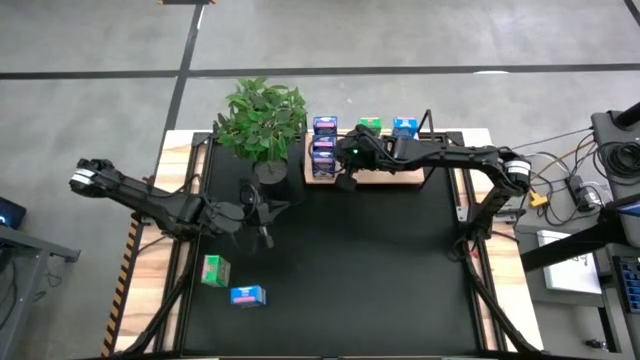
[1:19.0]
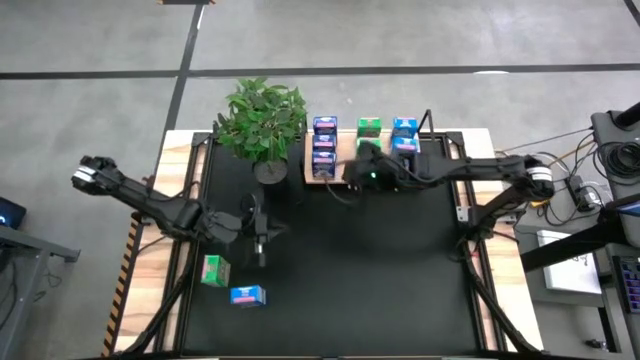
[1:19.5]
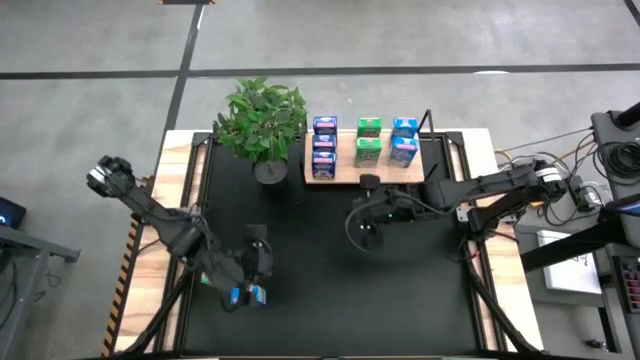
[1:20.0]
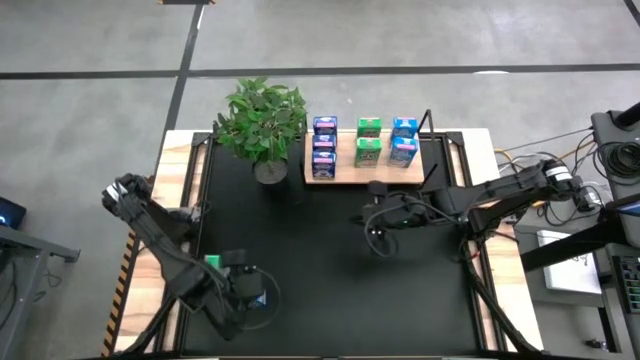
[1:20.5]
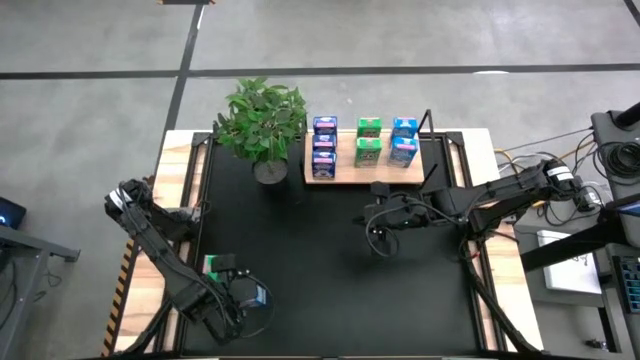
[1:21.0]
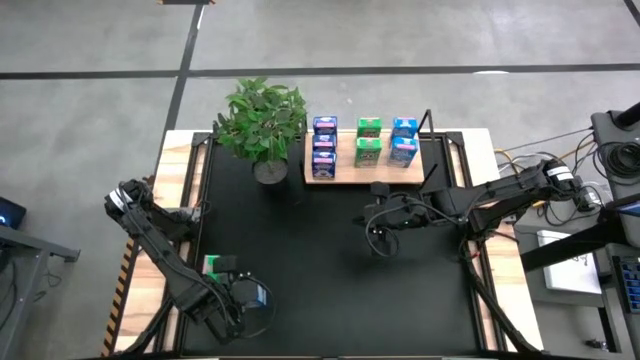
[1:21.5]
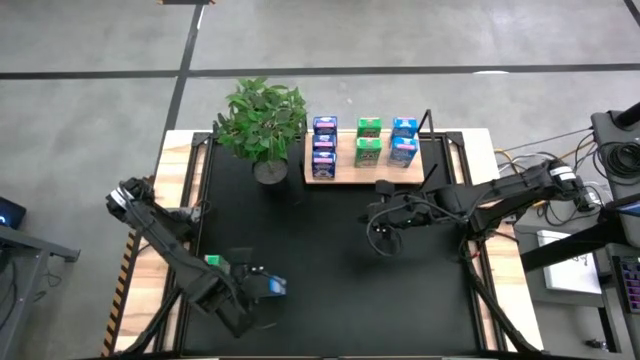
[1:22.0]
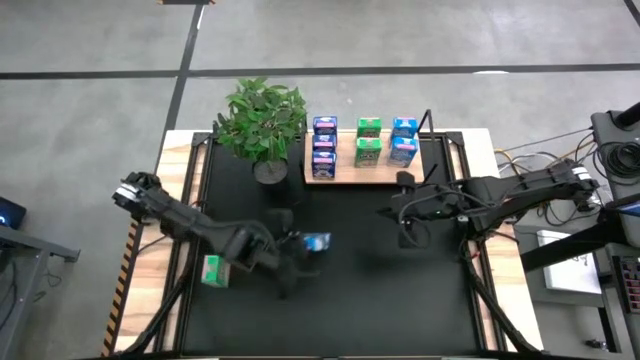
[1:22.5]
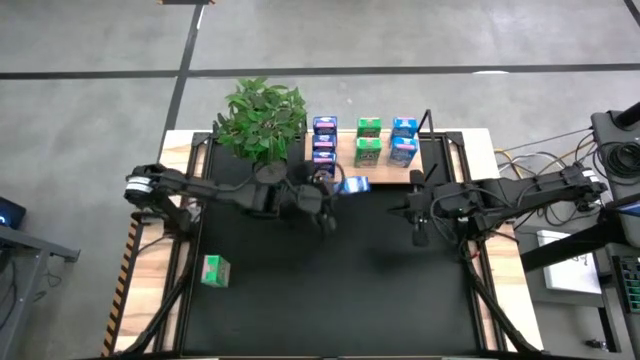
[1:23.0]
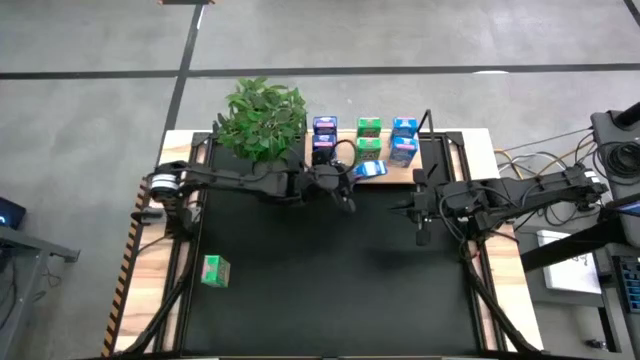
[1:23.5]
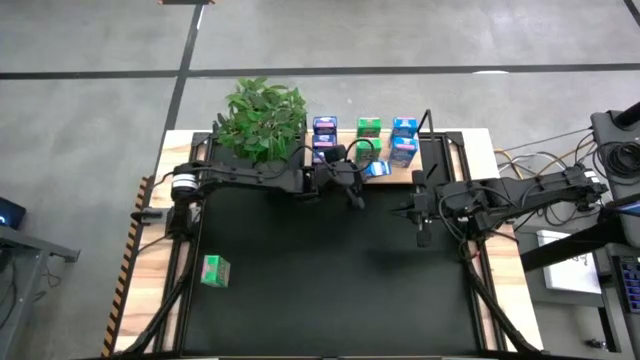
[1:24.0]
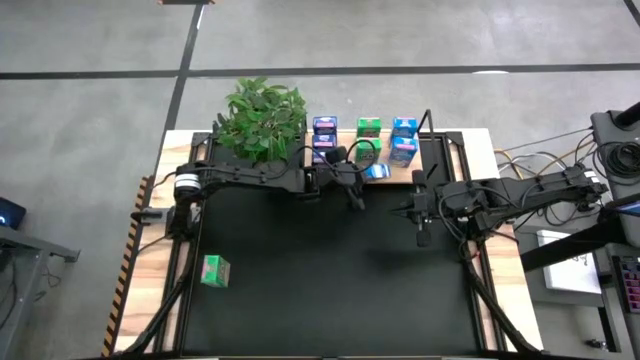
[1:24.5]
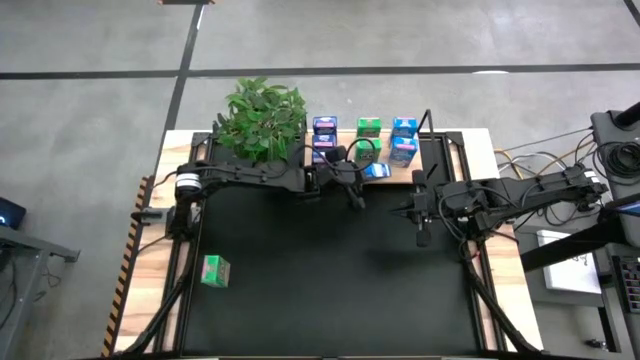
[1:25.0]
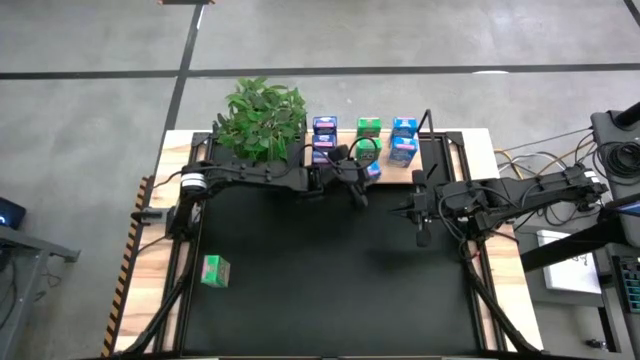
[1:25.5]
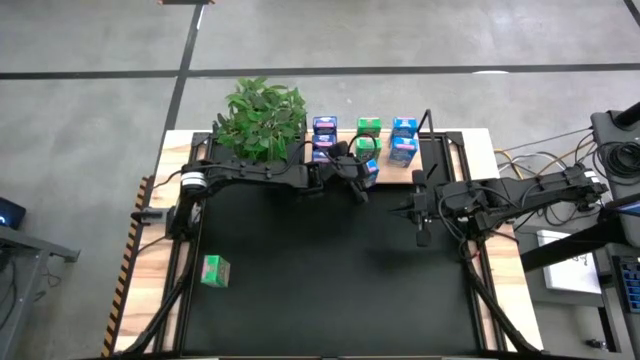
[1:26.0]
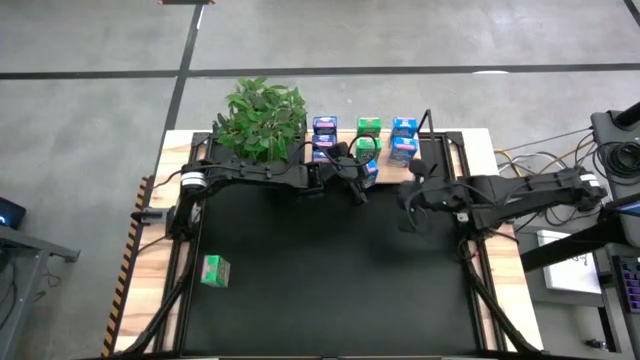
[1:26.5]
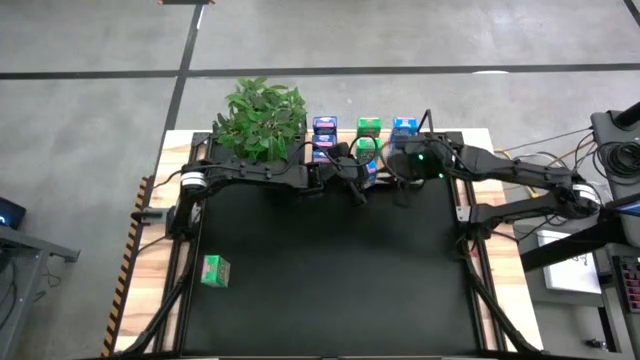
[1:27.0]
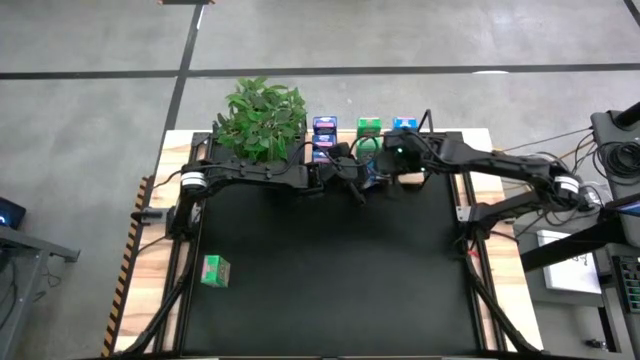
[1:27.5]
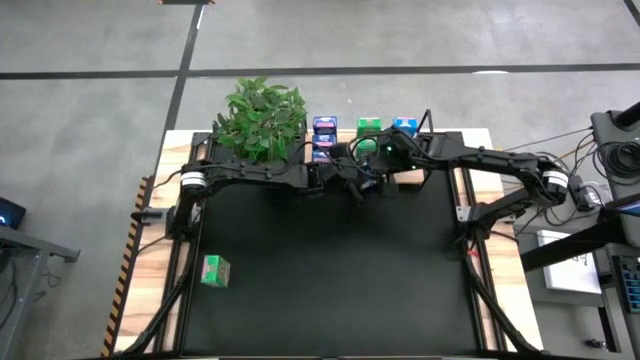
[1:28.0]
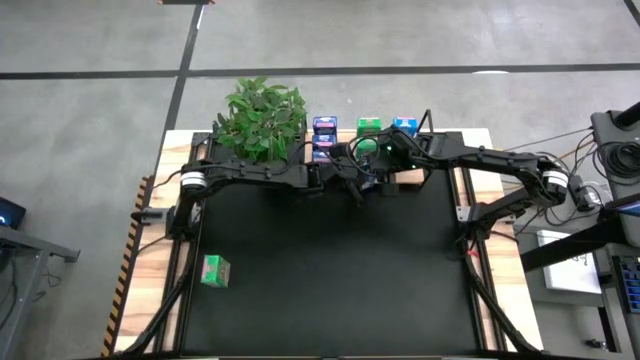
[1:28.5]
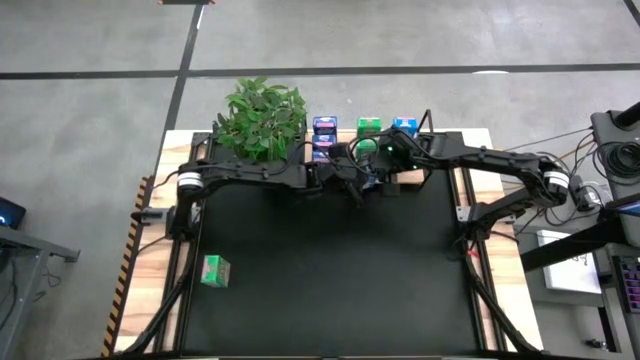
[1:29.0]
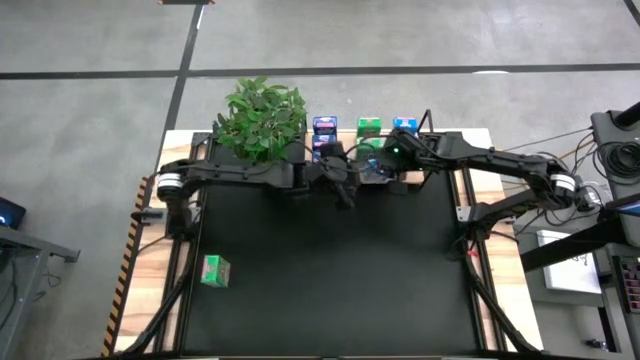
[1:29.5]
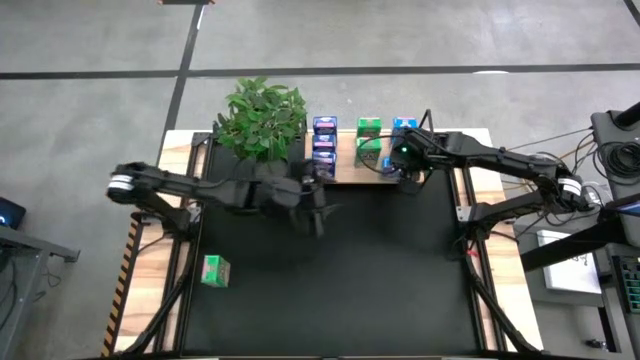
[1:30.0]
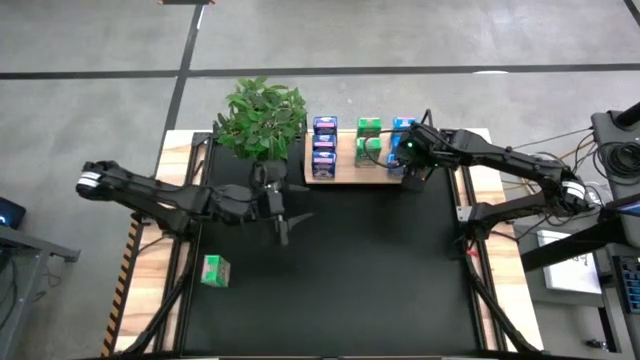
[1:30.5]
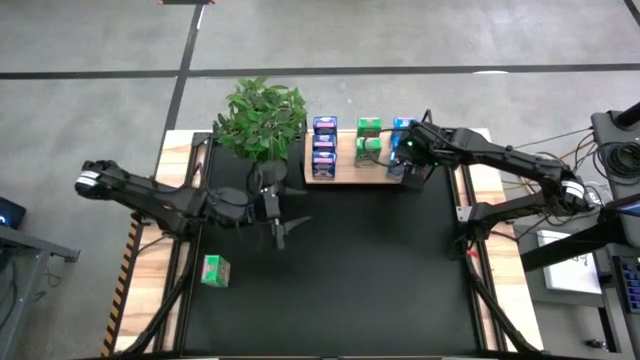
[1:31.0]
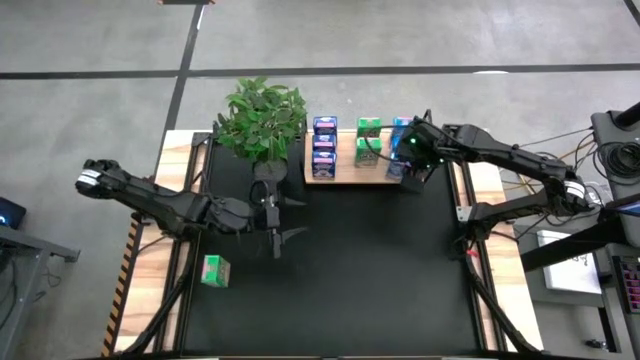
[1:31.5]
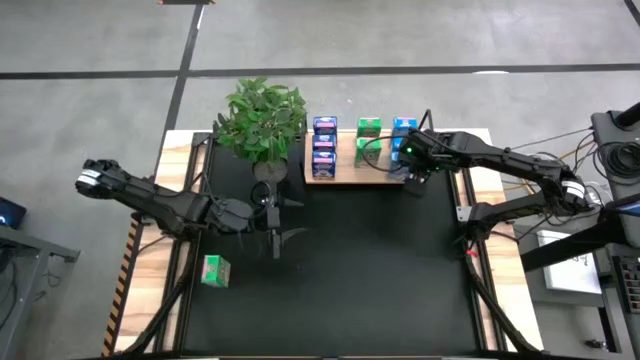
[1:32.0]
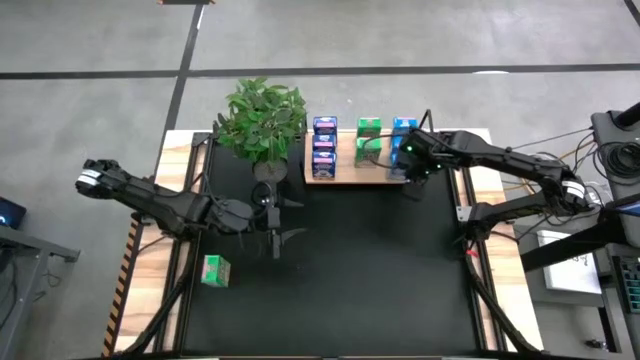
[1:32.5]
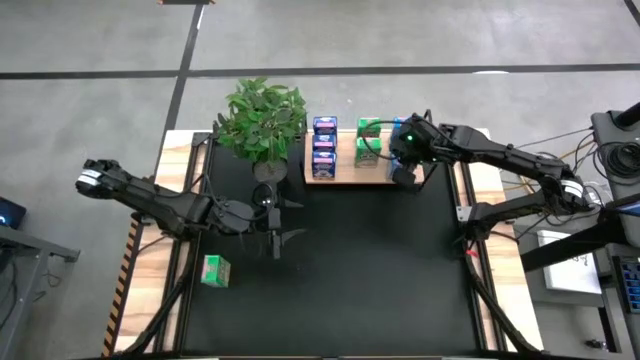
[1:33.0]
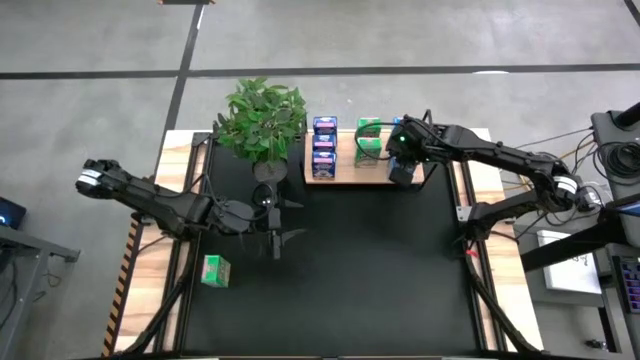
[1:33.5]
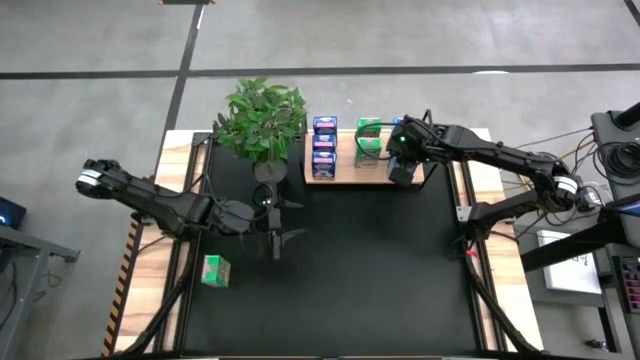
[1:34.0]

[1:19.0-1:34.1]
Task: Stack cereal on shelf
Put the light blue cereal box on the shelf aligned with the other light blue cereal boxes
